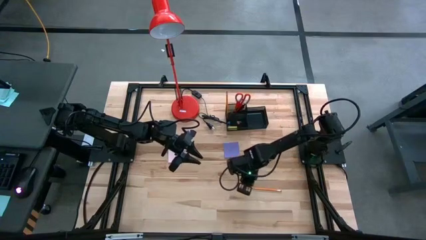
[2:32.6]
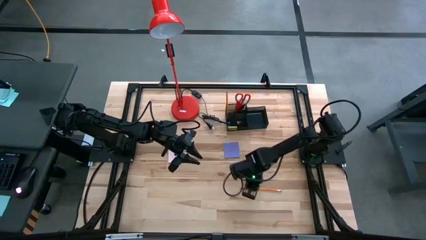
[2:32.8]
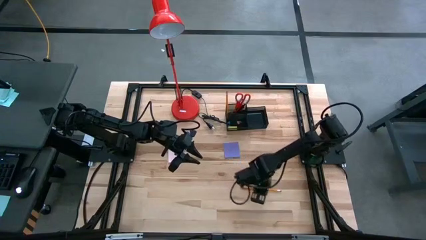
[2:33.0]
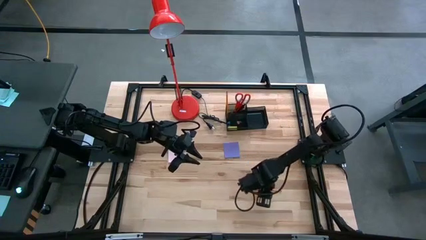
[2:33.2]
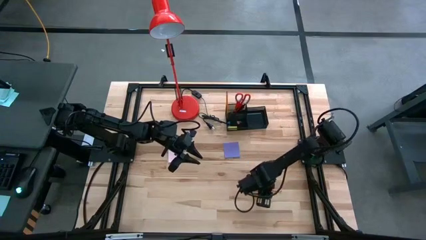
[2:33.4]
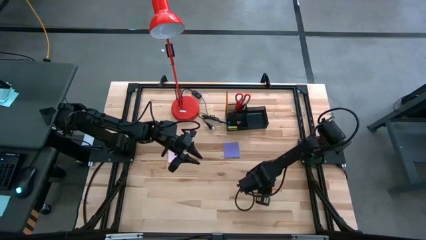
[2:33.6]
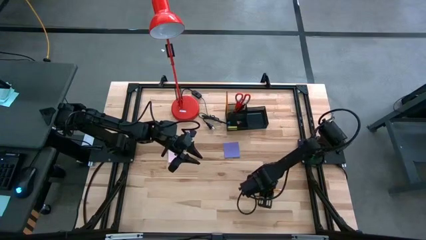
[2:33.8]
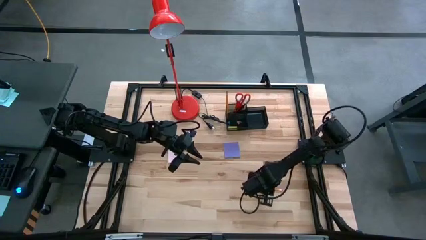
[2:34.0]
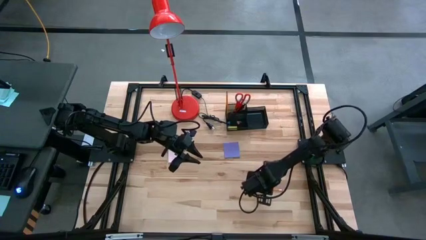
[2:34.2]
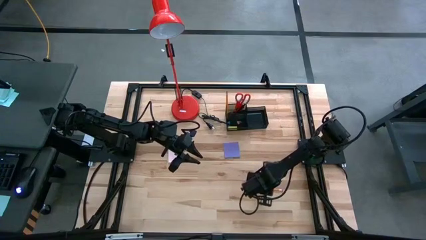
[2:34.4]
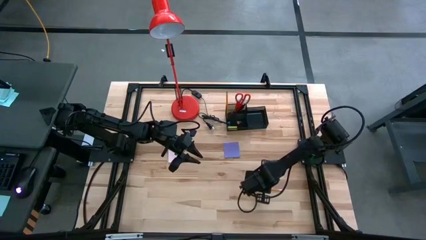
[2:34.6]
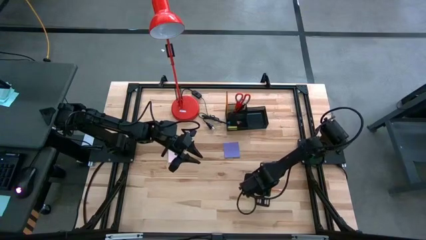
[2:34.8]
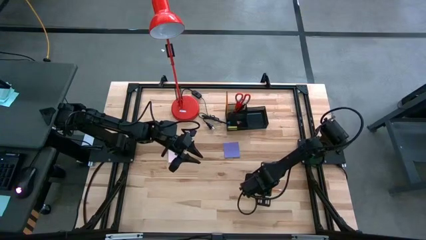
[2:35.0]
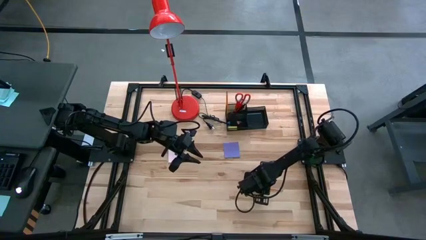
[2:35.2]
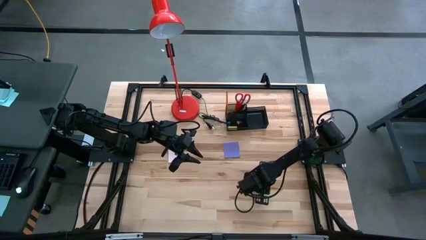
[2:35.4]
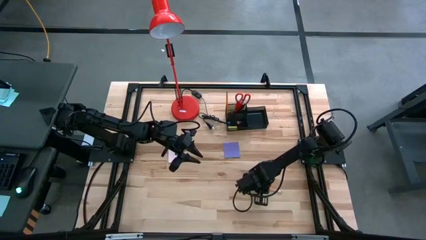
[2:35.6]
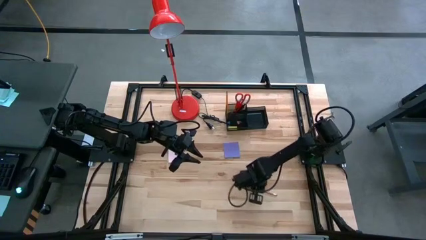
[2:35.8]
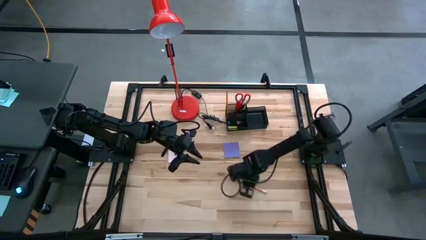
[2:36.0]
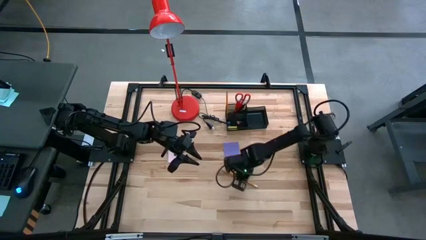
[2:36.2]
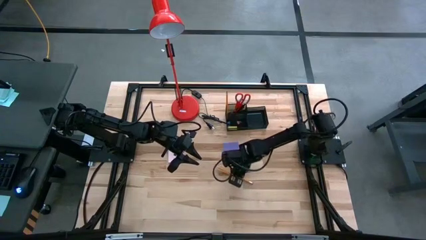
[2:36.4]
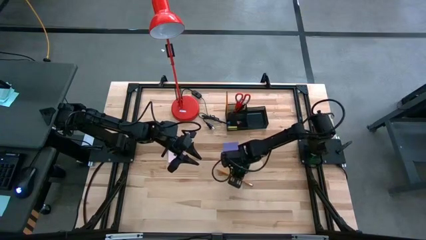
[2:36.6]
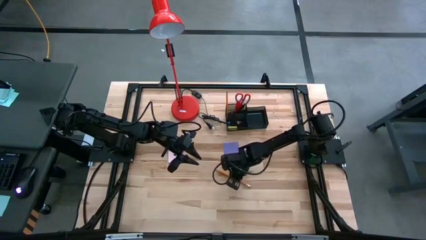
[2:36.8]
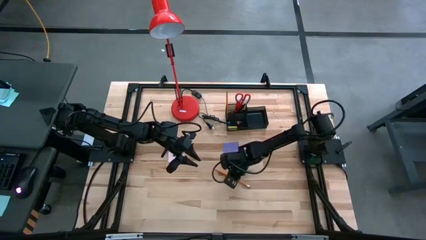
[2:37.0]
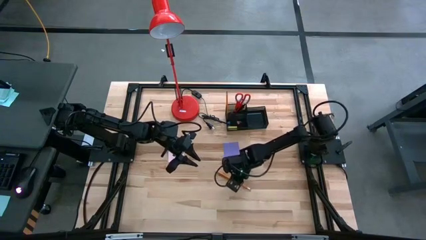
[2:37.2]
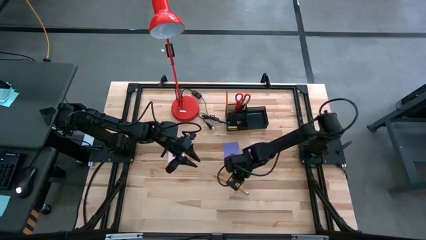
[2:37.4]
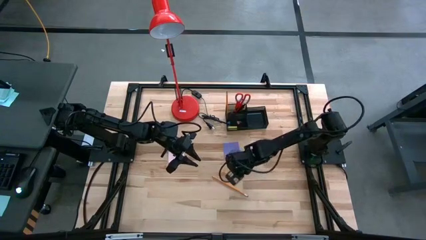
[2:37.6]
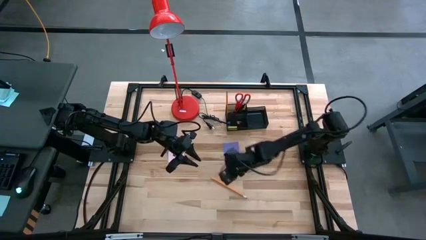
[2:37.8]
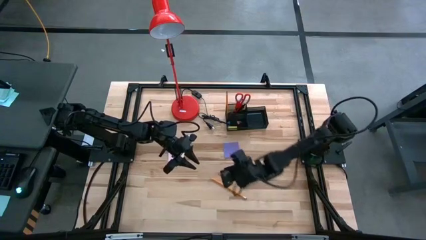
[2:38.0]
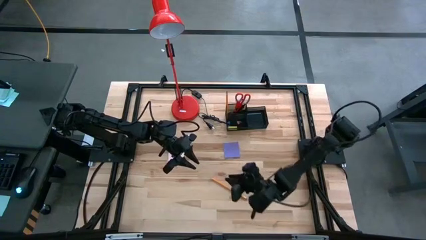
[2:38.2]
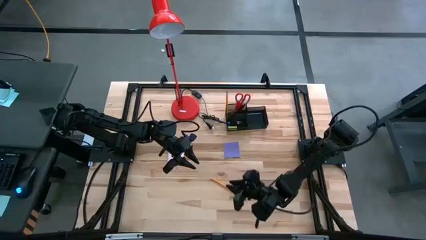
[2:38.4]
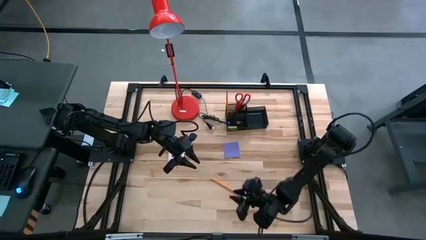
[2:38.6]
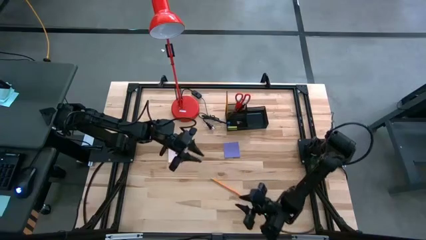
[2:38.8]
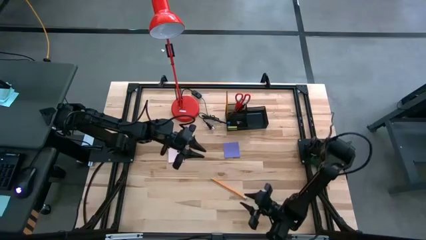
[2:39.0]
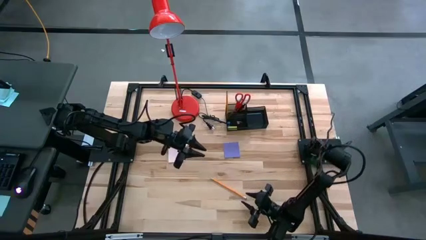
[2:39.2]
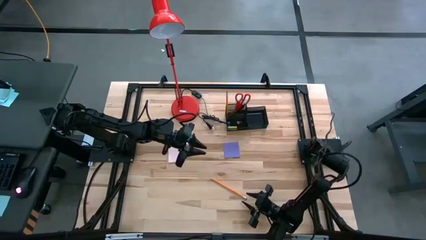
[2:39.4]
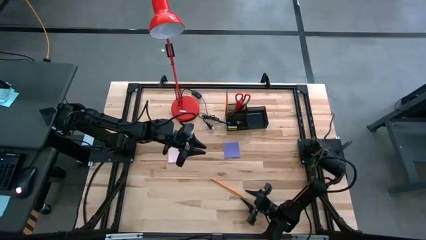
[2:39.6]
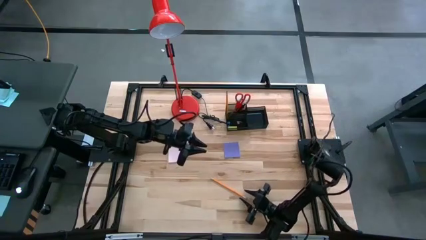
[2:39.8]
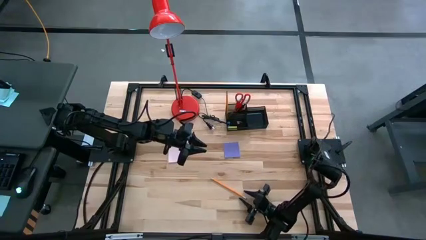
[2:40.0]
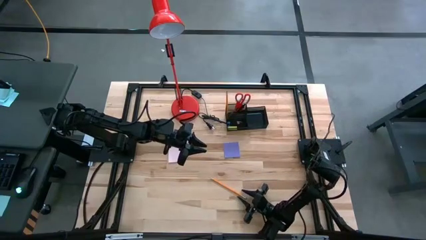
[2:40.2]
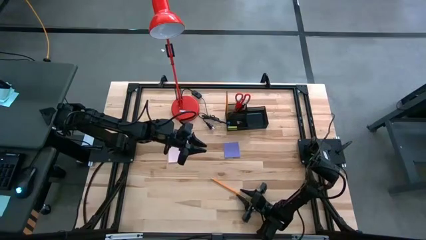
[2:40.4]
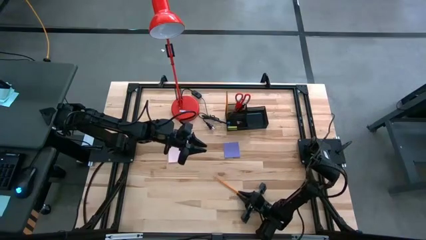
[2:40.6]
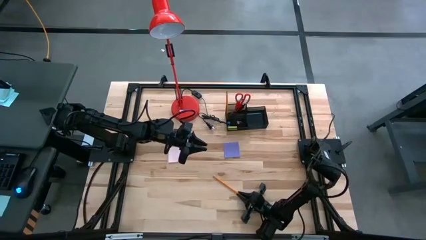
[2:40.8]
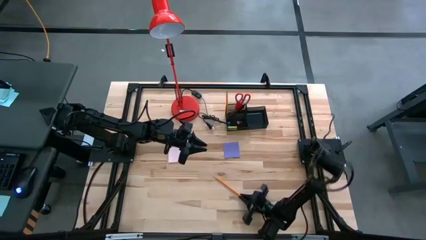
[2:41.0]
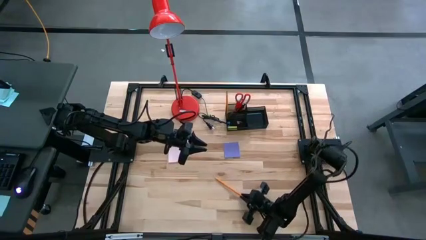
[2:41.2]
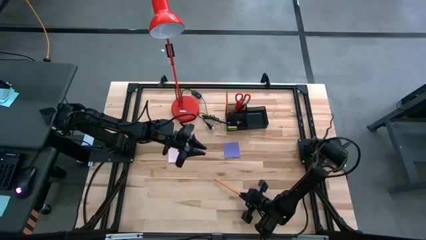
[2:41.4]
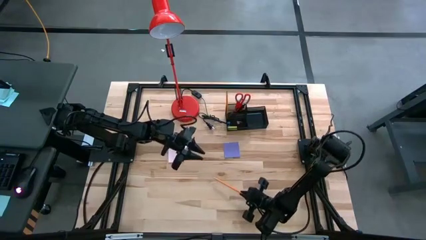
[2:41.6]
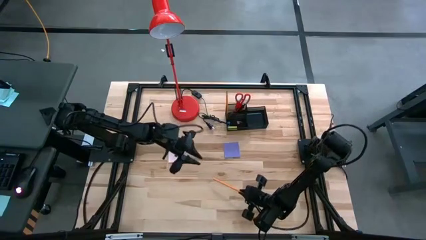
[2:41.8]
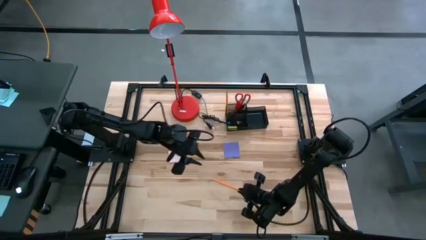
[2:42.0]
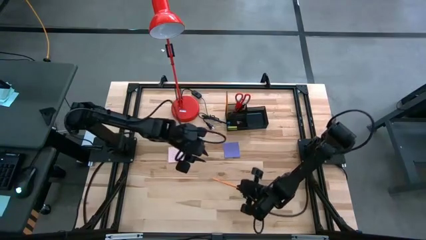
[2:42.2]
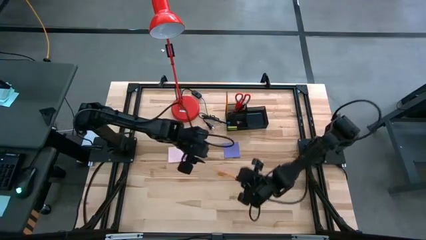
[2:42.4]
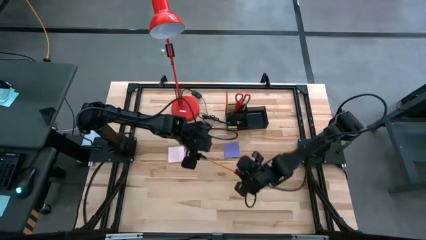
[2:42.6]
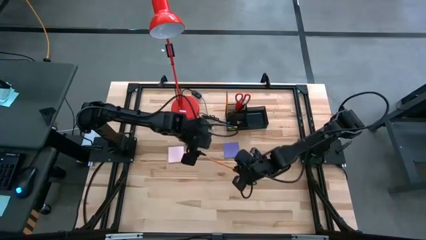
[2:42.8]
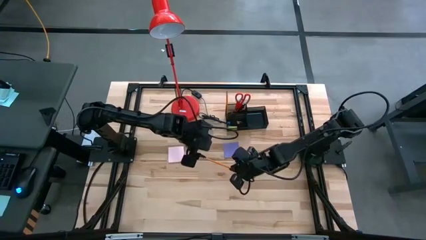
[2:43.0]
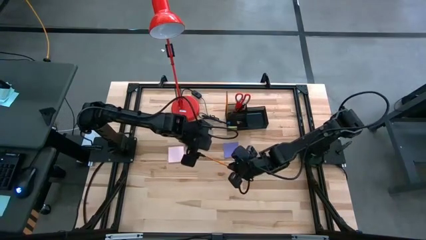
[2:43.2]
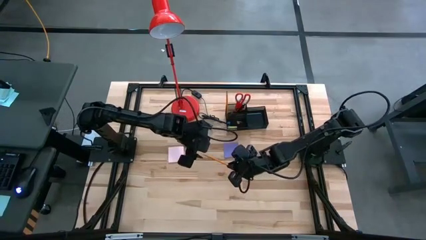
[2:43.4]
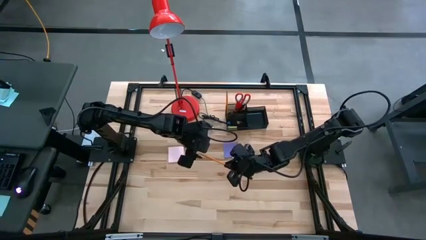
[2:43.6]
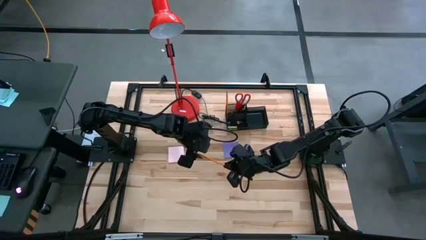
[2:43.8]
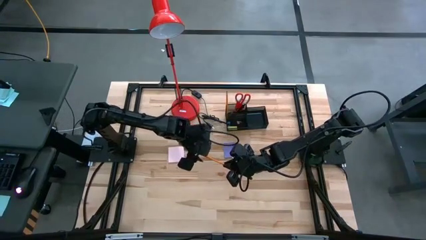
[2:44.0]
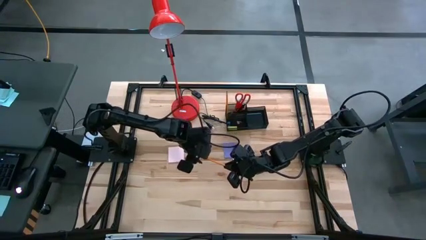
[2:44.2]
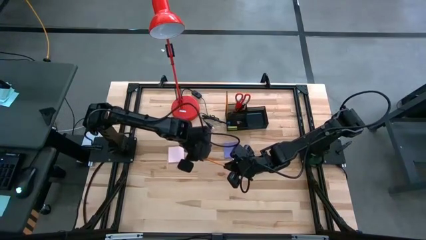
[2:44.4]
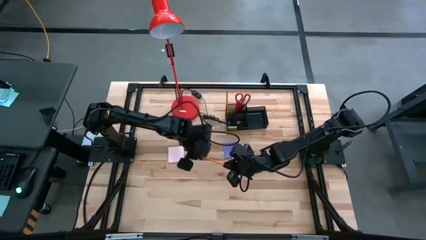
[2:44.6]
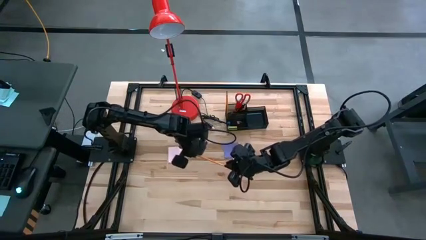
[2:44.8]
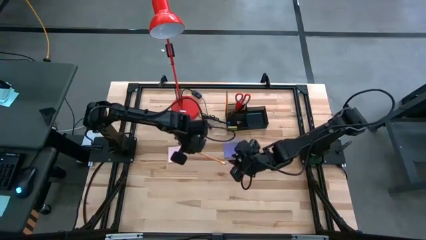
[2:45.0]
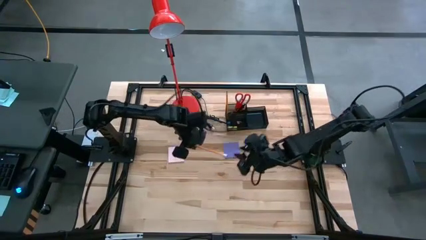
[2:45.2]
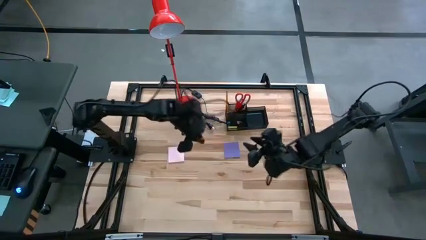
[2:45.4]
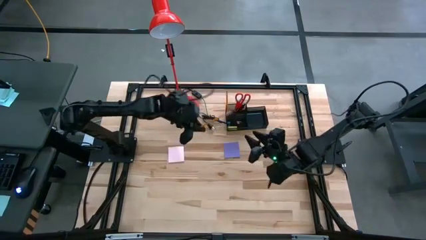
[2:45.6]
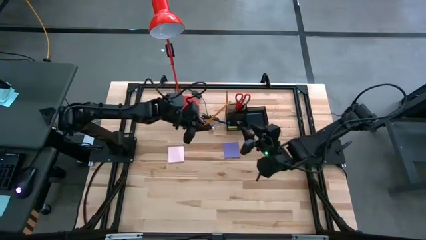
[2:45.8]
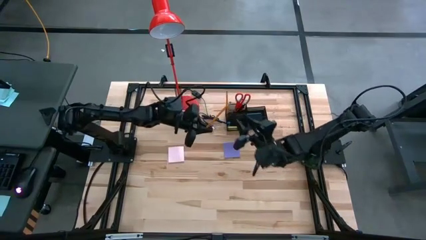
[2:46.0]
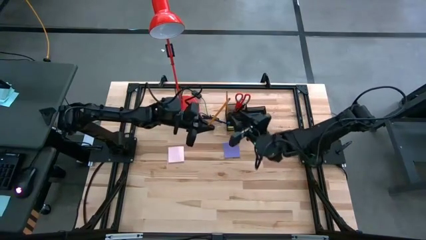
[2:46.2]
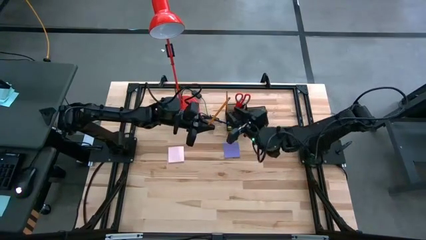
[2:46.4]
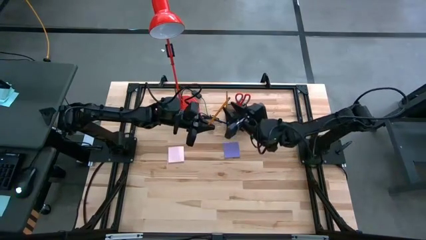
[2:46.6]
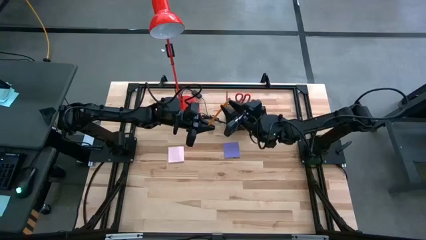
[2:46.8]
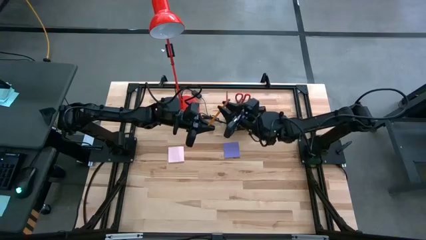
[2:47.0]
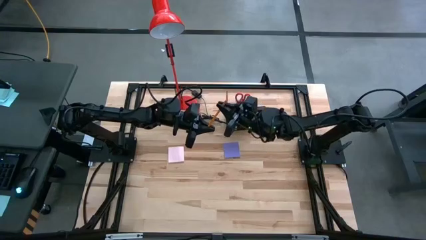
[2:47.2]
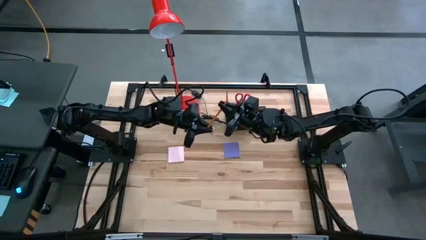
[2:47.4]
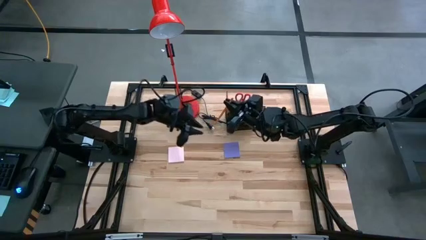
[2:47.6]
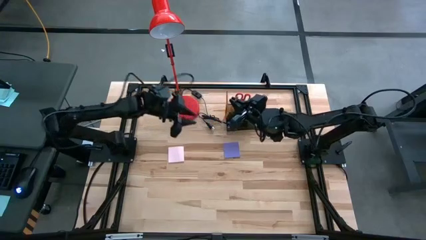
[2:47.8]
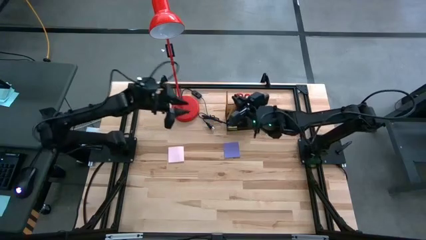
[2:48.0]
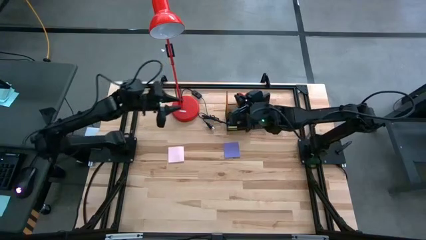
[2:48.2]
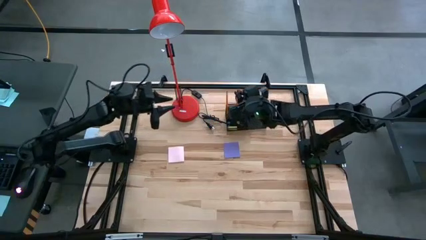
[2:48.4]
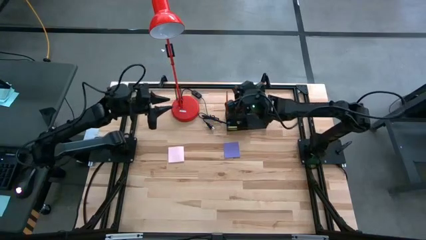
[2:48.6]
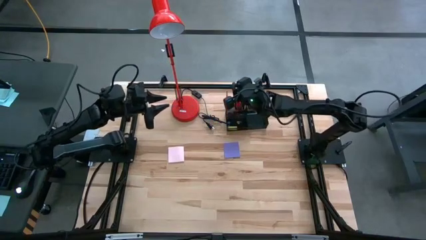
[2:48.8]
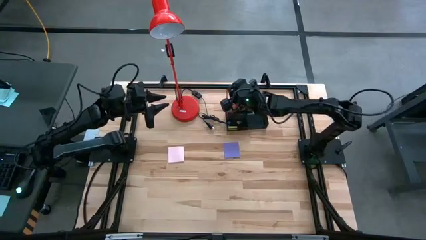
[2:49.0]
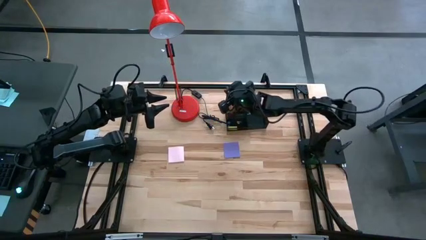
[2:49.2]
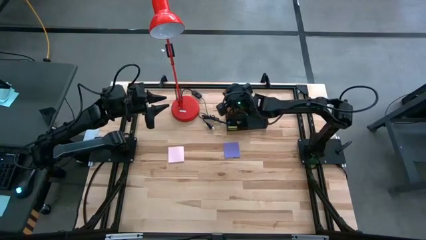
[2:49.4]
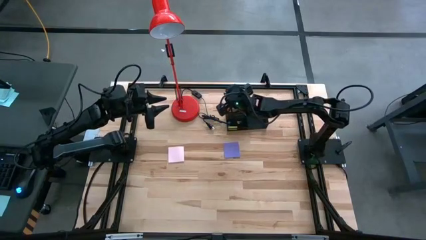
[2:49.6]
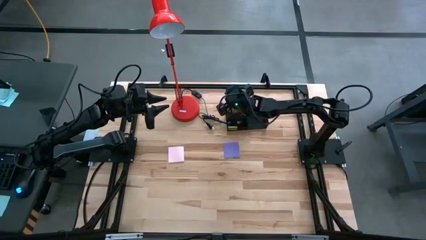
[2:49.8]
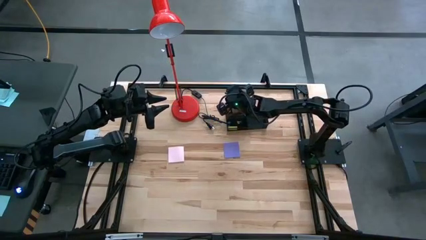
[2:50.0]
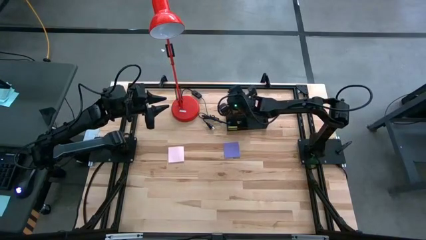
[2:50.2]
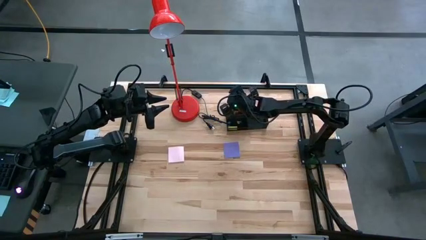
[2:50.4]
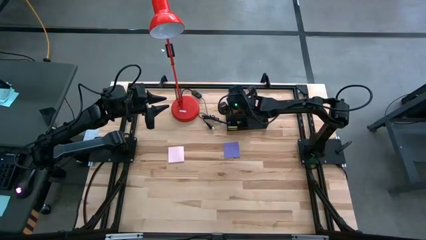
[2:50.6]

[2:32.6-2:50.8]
Task: Pick and place office supplies into organizer
Put the orange pencil into the black desk organizer
